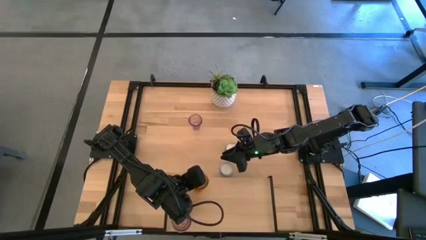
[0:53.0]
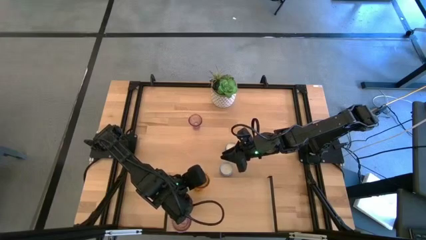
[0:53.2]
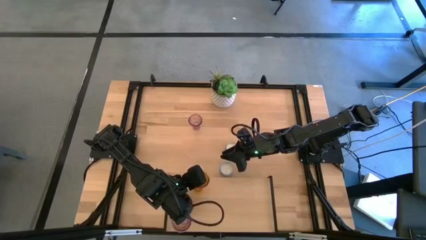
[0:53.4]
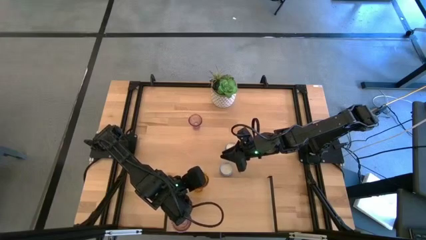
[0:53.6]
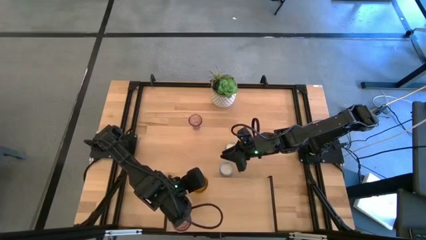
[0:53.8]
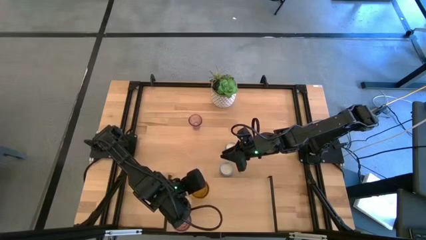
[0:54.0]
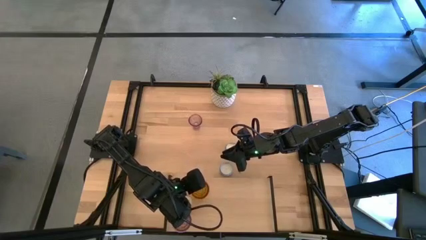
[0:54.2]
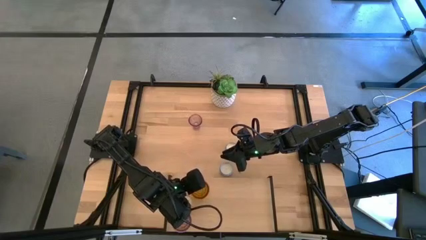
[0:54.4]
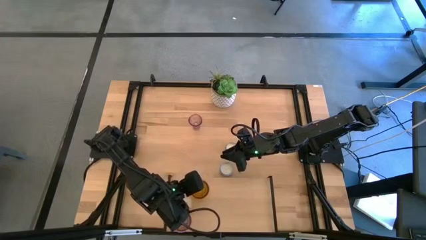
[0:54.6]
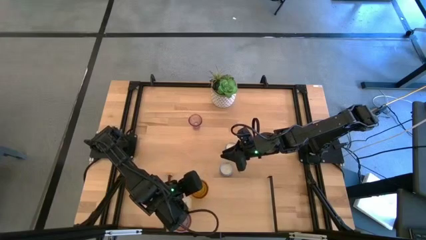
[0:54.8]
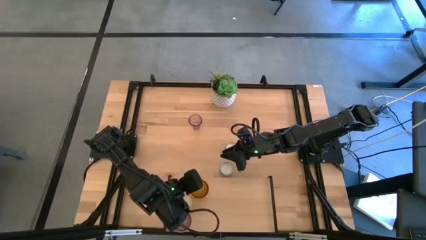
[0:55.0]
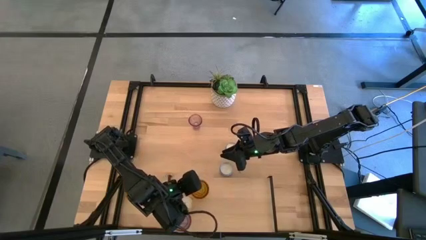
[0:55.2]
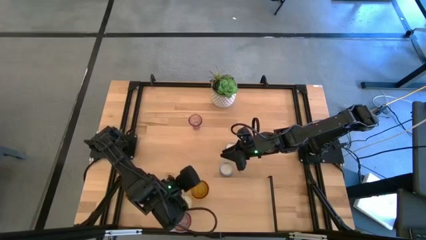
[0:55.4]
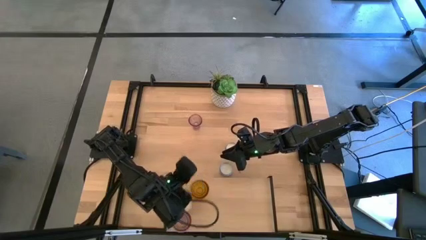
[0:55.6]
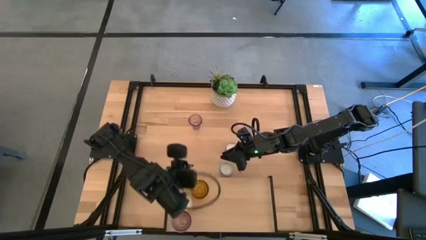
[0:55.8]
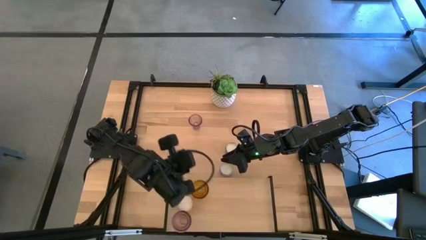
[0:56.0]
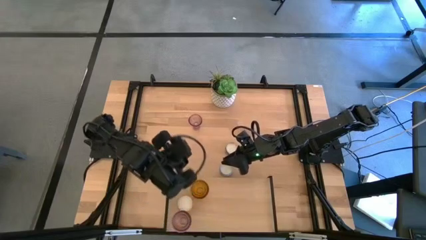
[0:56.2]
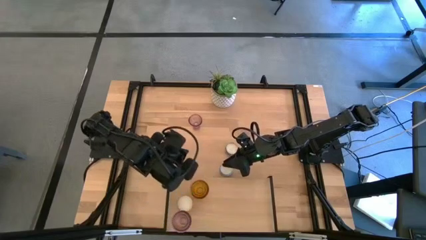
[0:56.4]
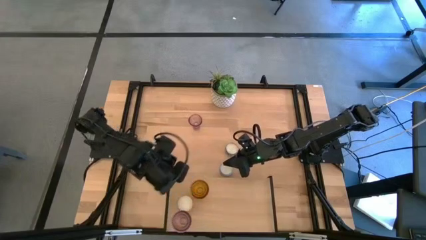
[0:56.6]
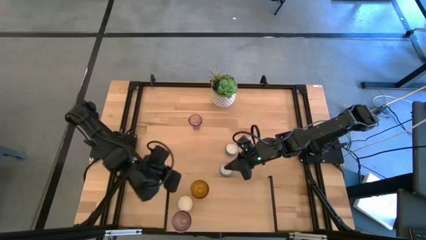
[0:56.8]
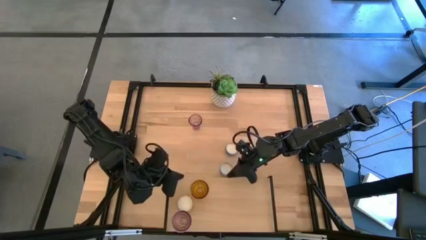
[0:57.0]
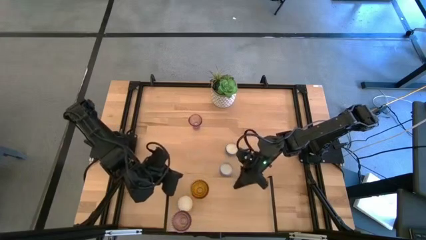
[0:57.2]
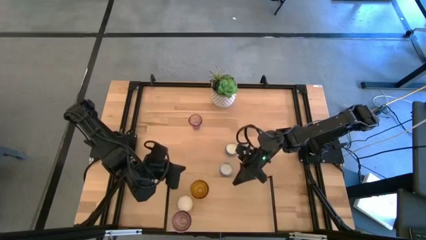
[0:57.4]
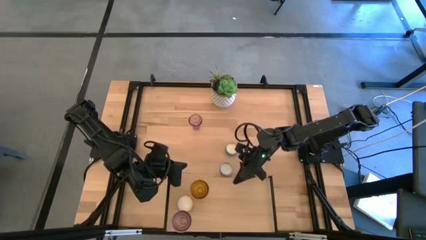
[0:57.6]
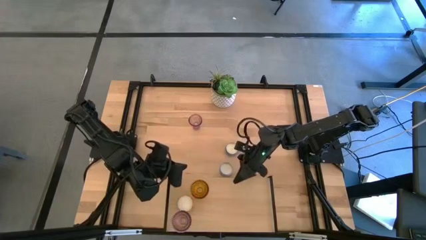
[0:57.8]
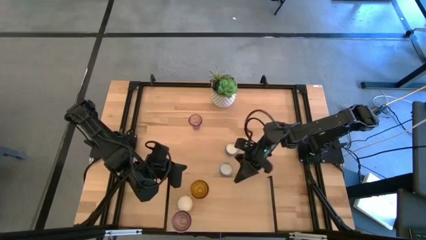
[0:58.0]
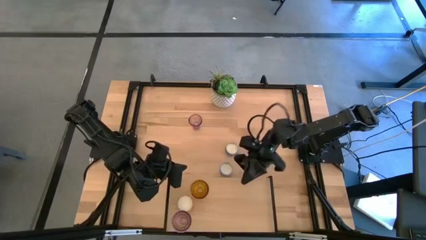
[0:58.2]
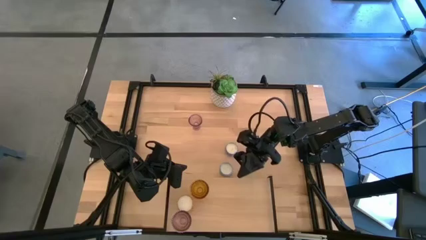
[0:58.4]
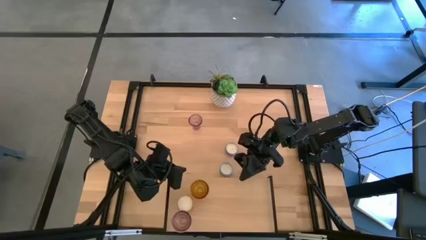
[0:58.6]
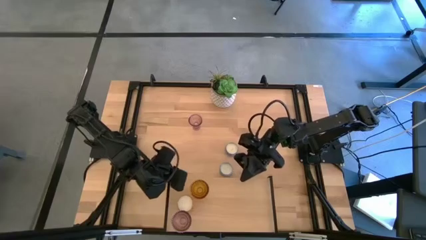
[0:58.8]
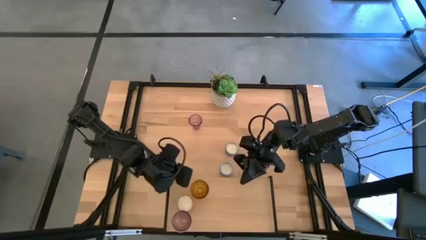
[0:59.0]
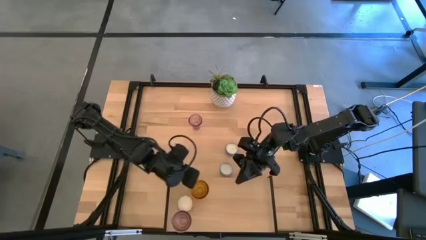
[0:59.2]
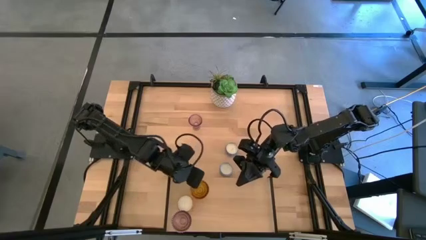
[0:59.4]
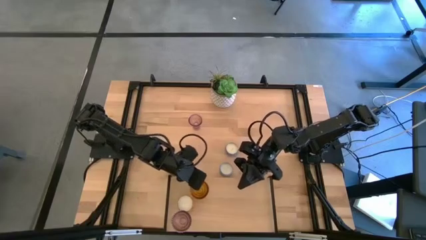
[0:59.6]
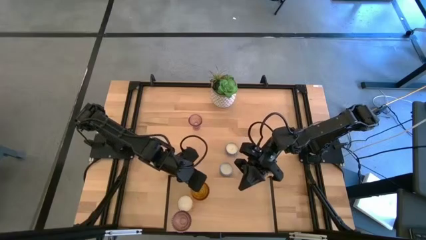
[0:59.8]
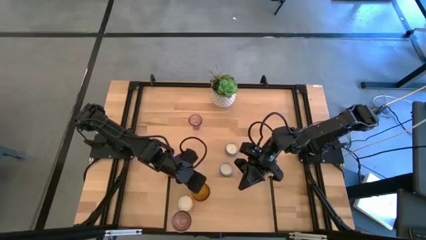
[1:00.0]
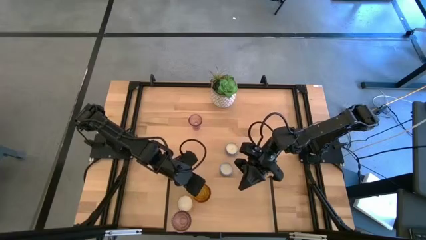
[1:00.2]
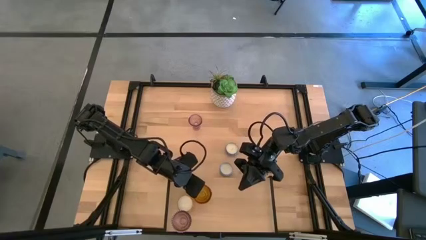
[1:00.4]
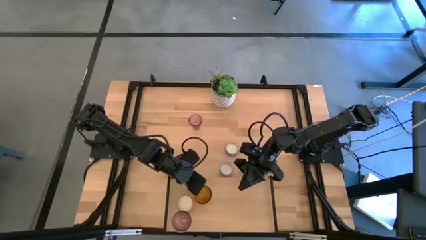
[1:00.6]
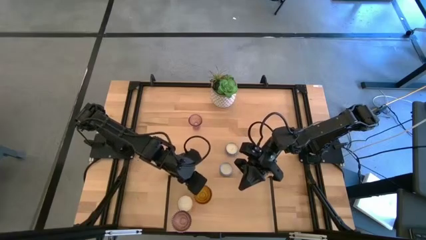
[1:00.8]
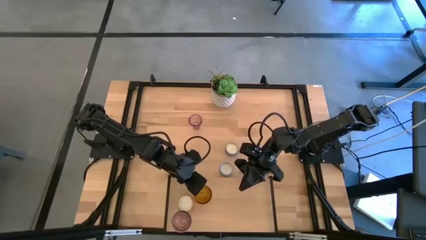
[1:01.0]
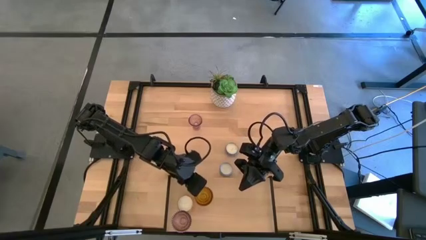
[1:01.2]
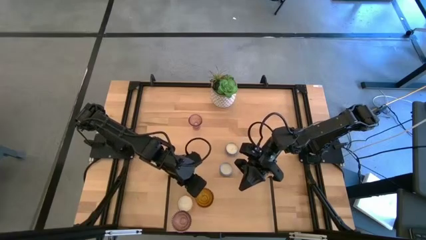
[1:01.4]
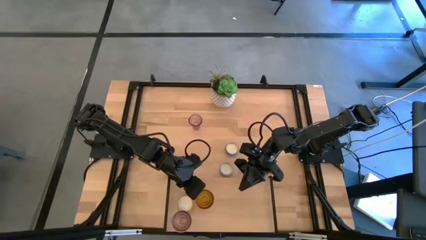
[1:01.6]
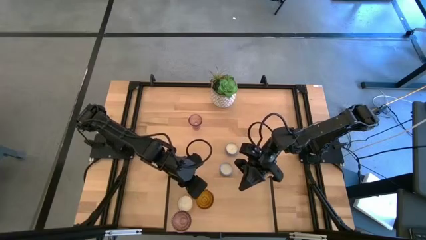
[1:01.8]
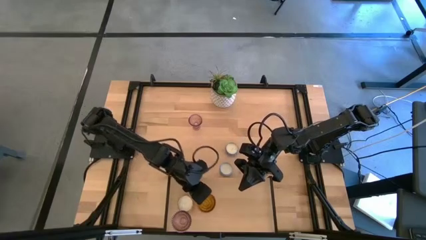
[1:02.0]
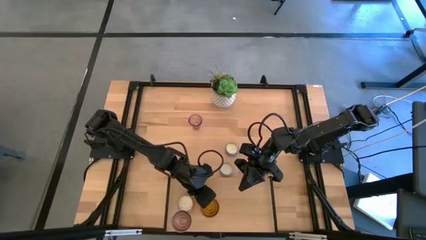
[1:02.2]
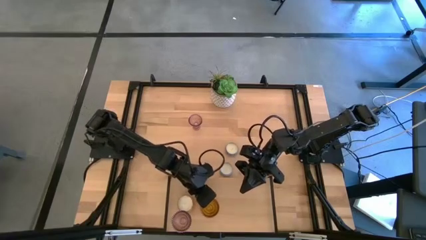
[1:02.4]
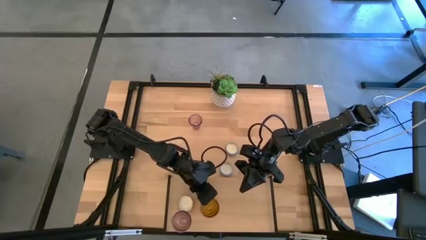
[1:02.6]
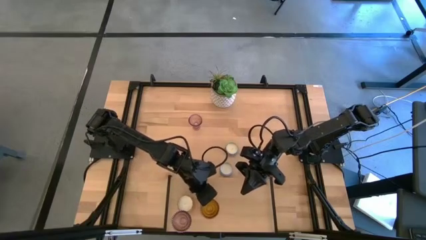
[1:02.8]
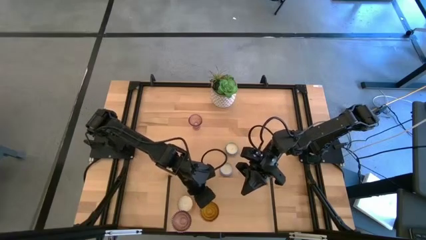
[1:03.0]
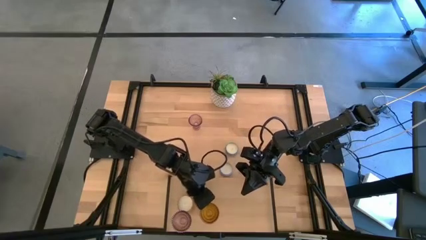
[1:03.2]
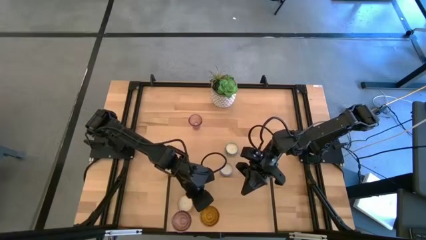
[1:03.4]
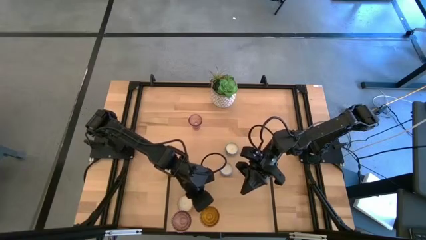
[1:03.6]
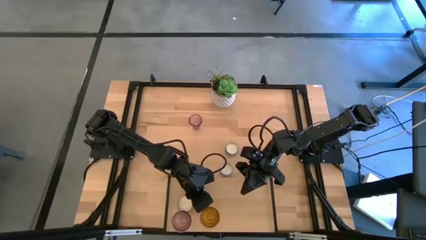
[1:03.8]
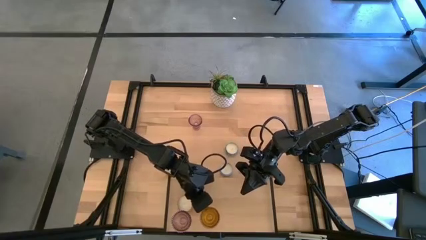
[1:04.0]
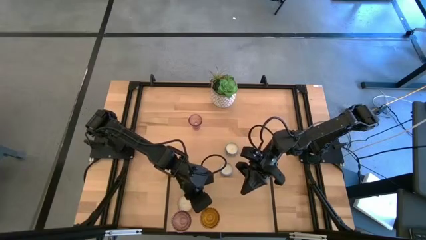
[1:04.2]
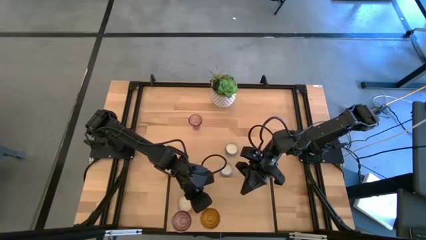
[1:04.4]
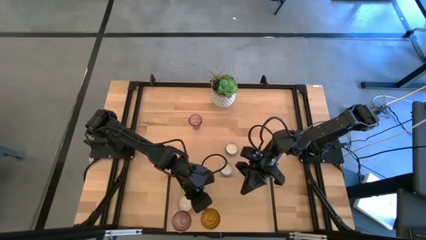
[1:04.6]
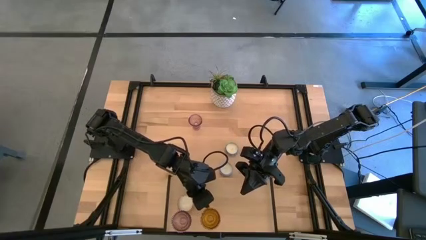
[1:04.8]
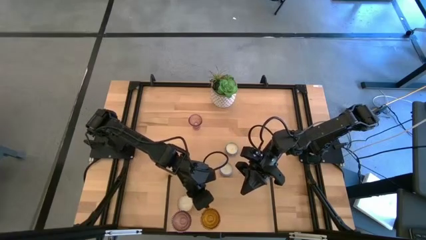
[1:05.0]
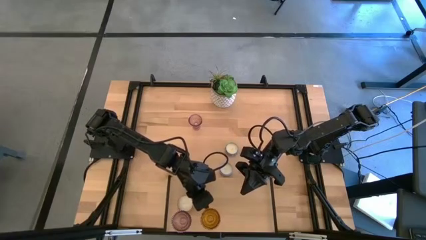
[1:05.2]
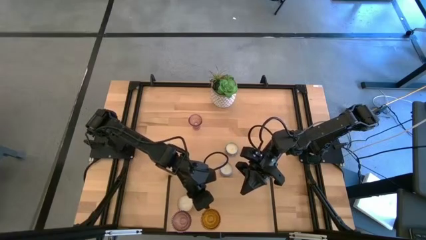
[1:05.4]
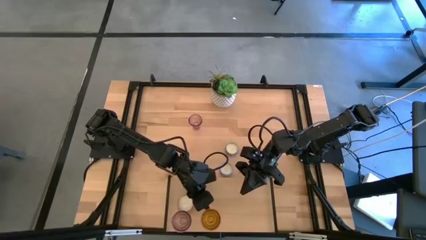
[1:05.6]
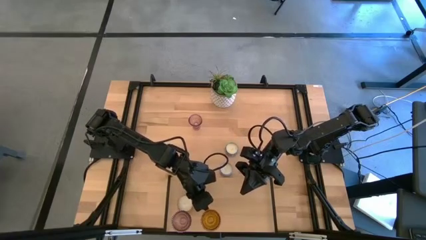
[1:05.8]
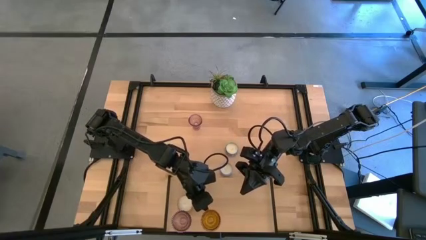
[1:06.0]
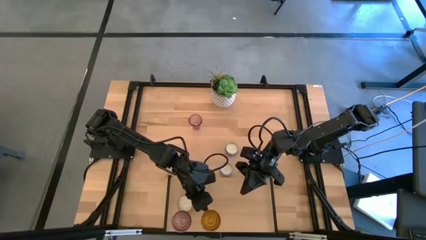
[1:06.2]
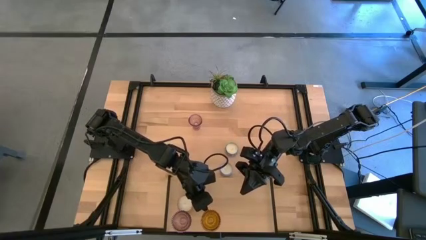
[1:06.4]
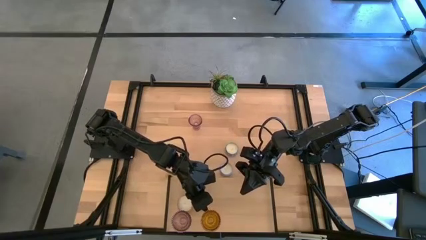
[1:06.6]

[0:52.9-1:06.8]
Task: Pick & Place candle stick holders
Put the yellow candle holder on the shelf

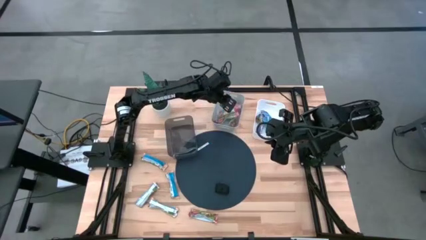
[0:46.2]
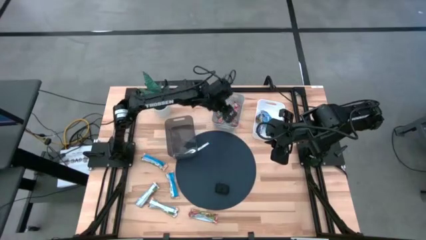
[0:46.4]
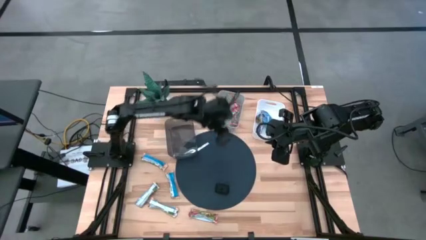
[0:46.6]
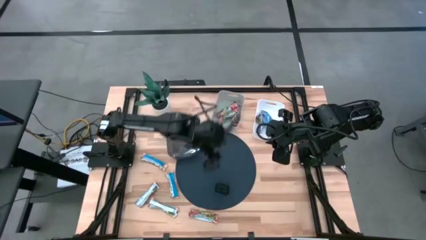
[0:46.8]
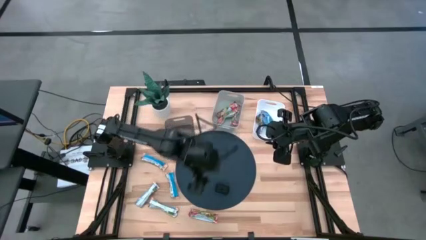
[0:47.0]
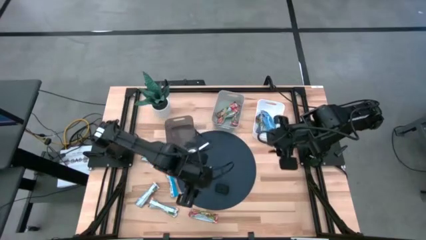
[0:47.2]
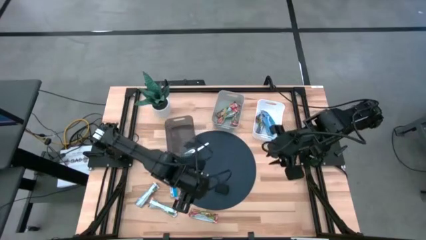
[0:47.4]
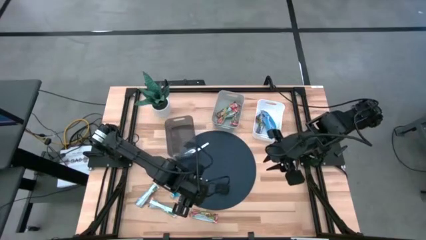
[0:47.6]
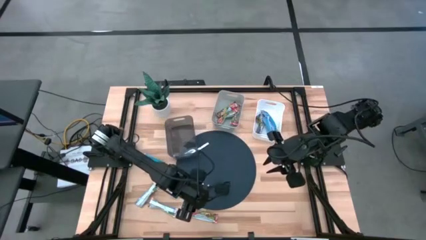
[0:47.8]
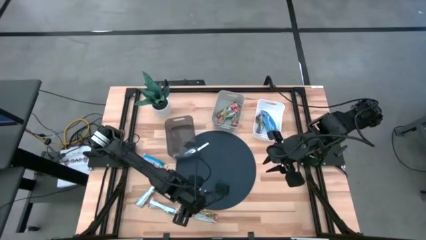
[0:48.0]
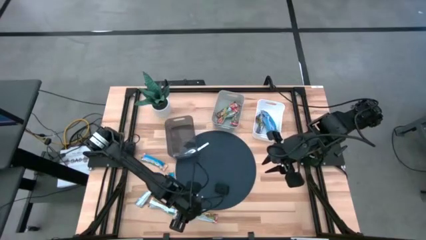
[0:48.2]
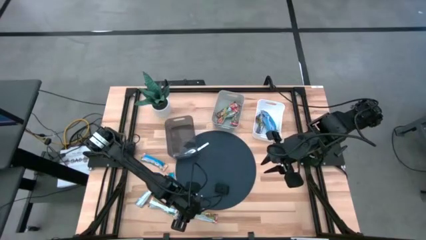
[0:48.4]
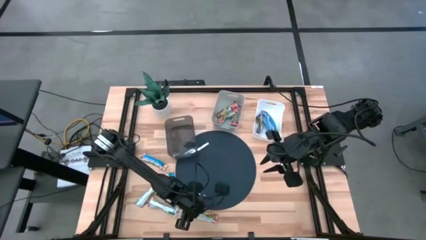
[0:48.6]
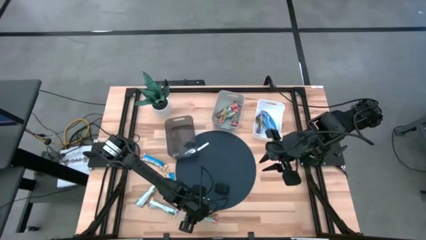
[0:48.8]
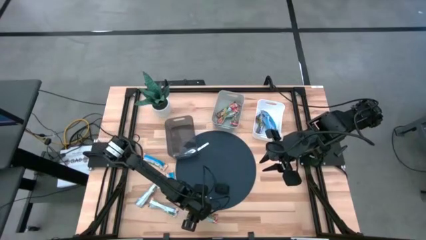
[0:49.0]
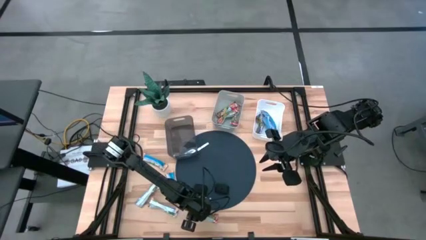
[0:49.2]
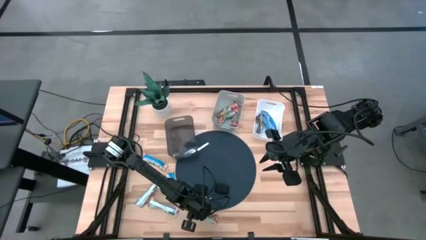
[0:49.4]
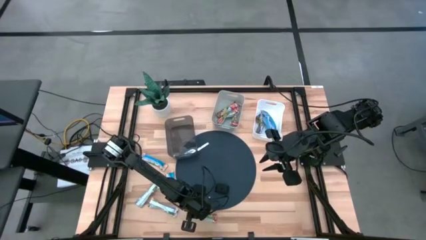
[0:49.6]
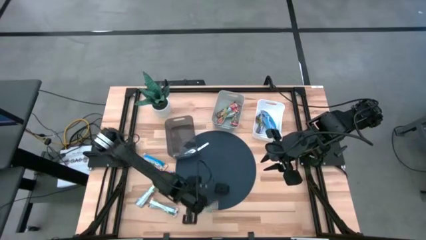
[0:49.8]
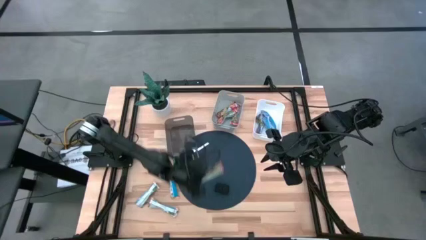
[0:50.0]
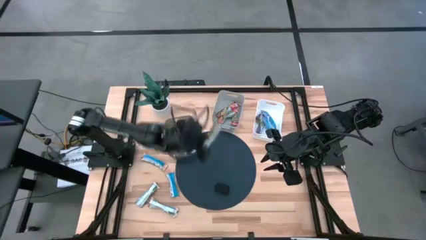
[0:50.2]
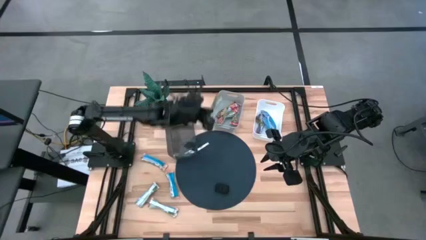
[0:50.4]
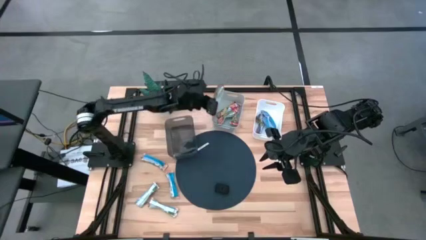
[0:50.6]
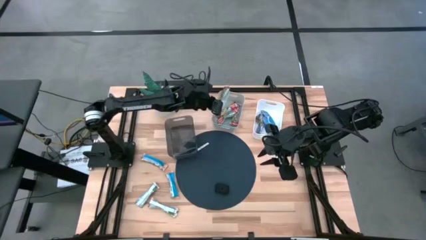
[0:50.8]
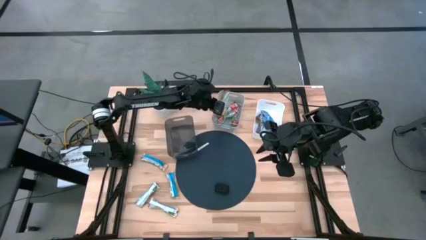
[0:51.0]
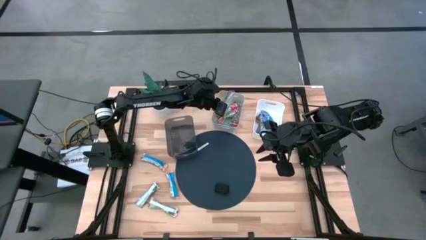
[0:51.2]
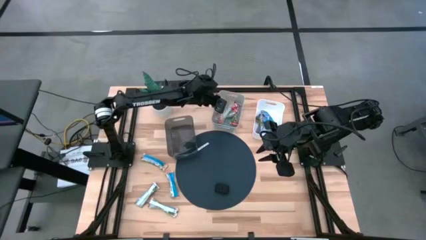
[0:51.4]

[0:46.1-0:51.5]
Task: Pick and place Granola Bars by type
Put the red granola bar into the gray bin
